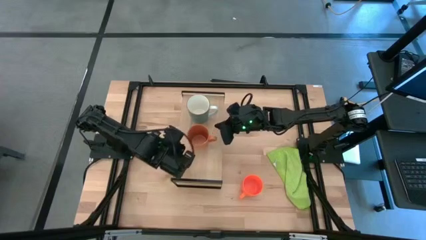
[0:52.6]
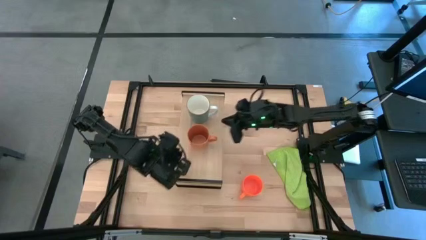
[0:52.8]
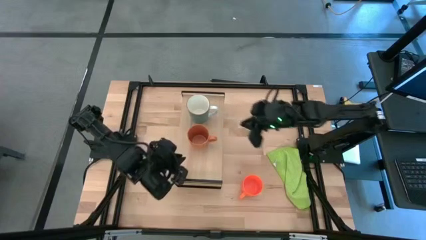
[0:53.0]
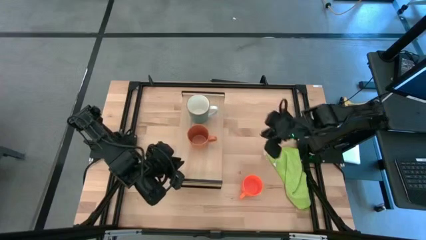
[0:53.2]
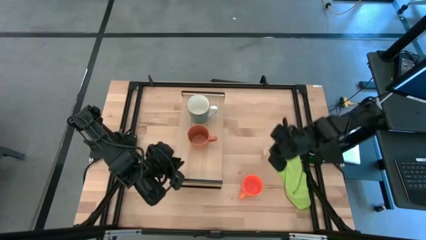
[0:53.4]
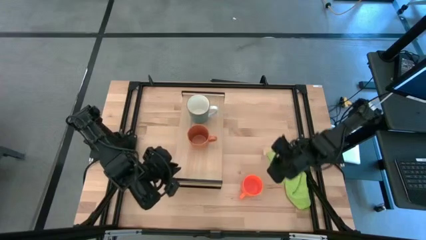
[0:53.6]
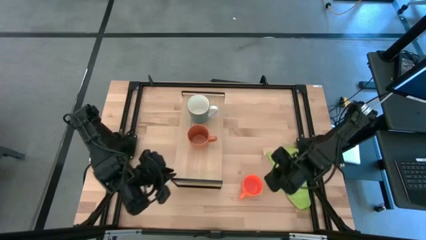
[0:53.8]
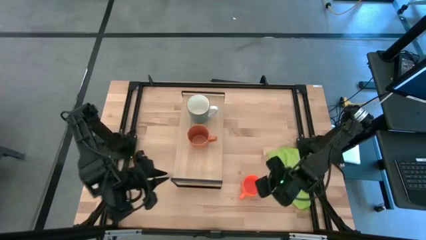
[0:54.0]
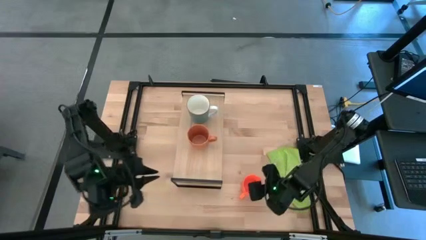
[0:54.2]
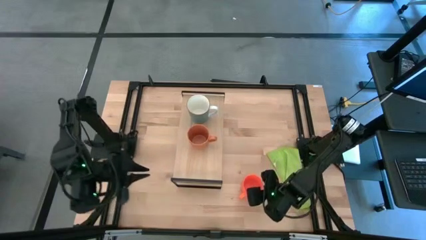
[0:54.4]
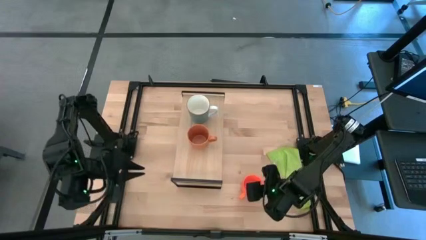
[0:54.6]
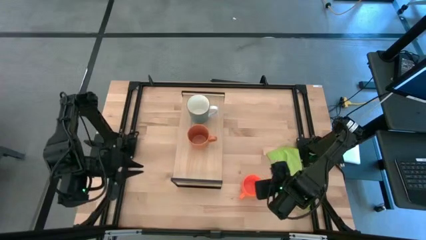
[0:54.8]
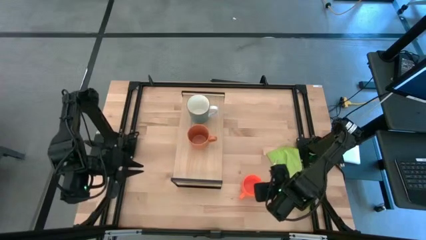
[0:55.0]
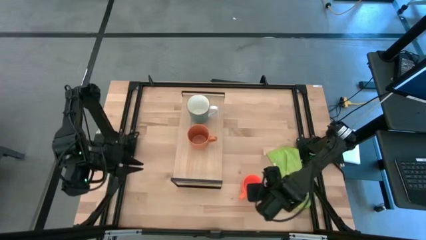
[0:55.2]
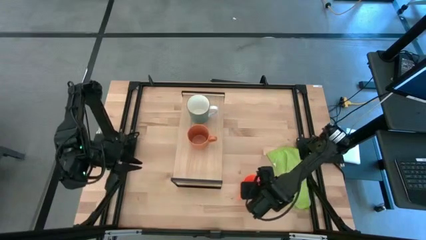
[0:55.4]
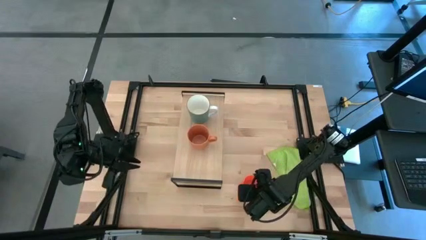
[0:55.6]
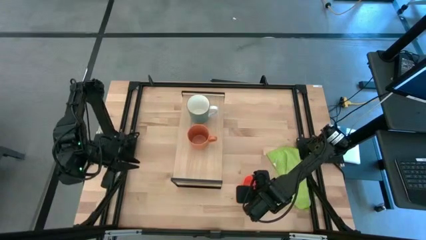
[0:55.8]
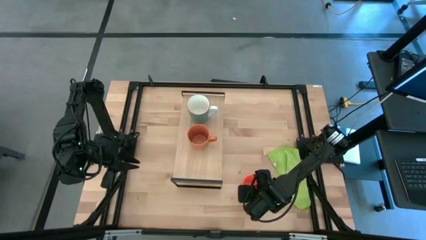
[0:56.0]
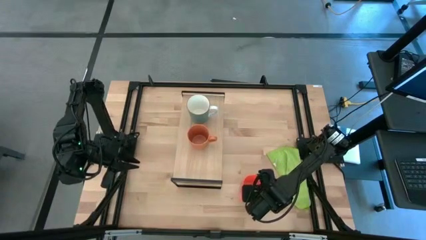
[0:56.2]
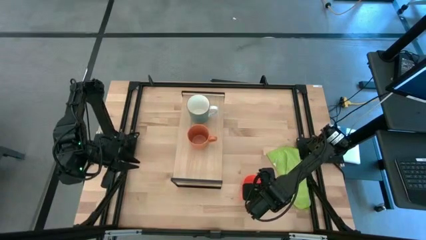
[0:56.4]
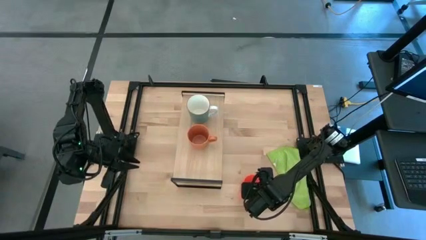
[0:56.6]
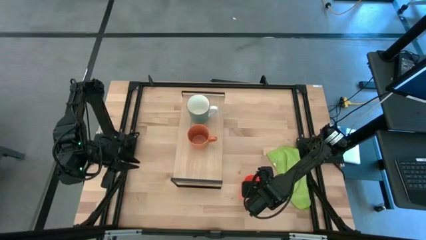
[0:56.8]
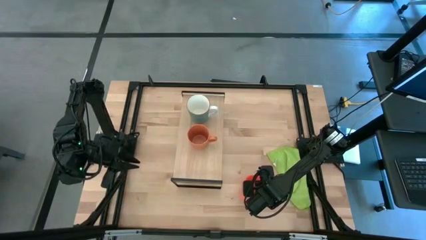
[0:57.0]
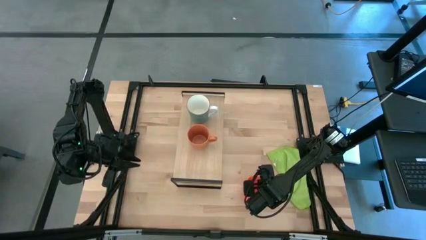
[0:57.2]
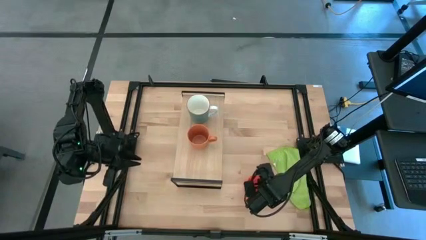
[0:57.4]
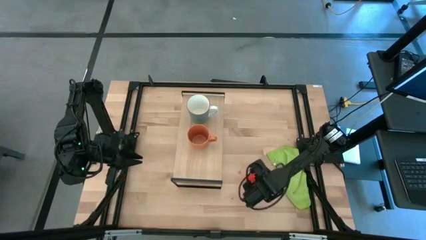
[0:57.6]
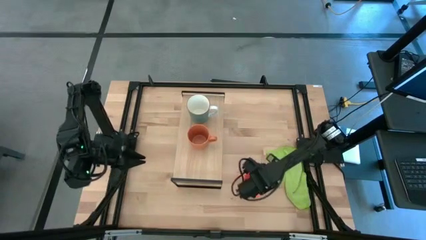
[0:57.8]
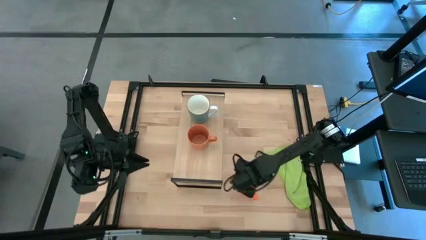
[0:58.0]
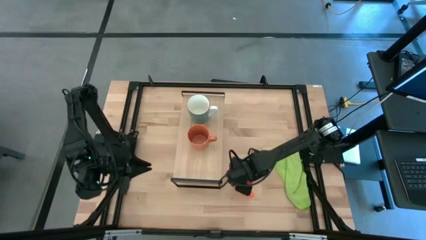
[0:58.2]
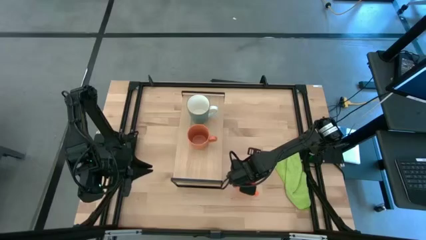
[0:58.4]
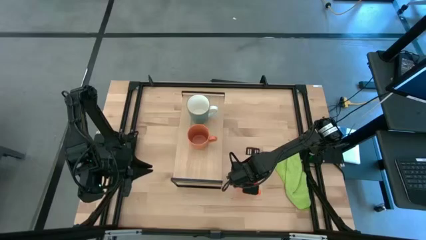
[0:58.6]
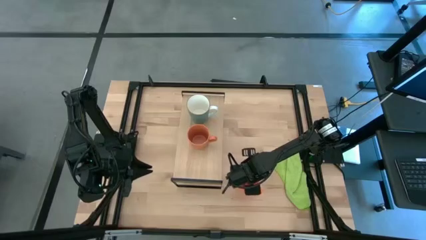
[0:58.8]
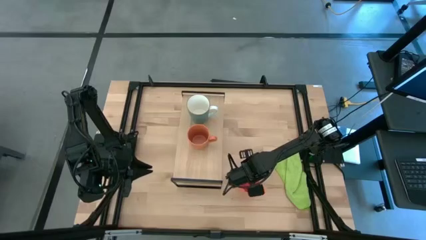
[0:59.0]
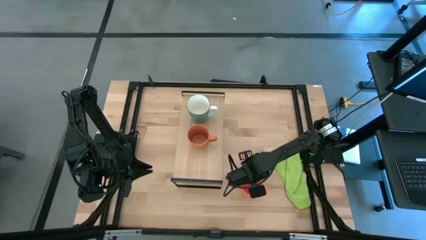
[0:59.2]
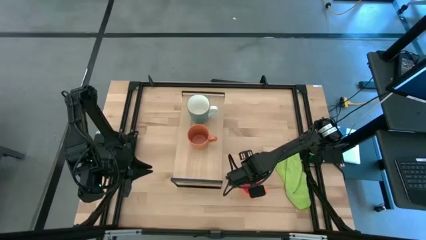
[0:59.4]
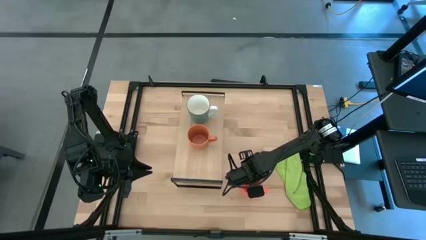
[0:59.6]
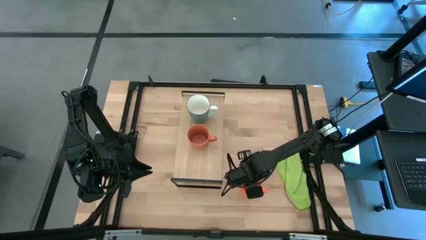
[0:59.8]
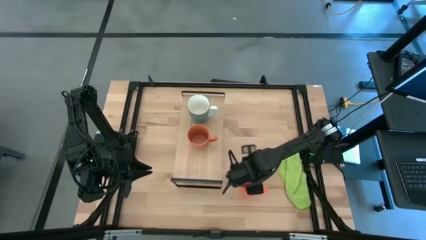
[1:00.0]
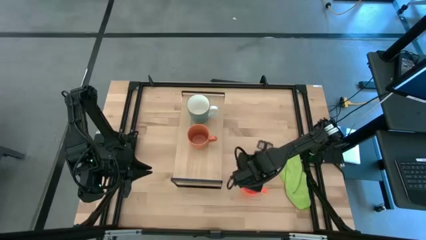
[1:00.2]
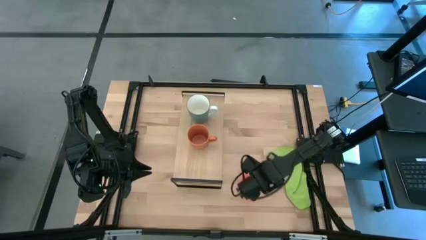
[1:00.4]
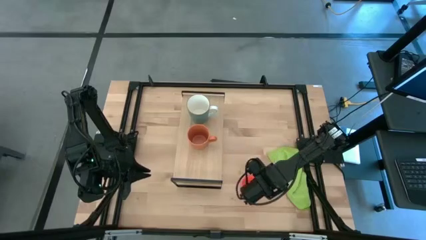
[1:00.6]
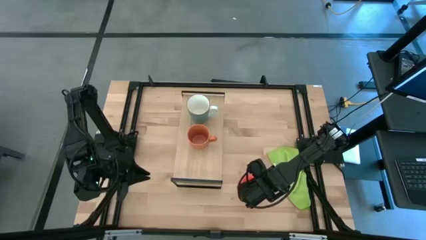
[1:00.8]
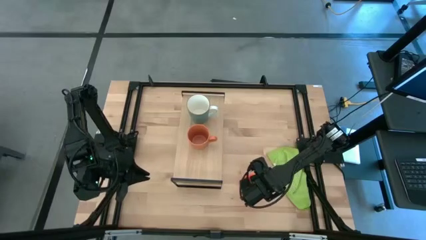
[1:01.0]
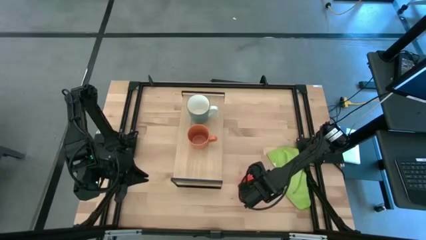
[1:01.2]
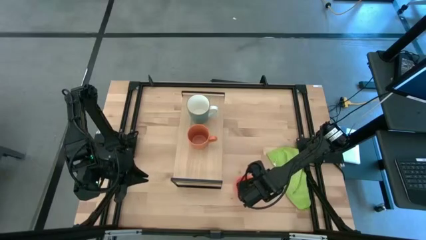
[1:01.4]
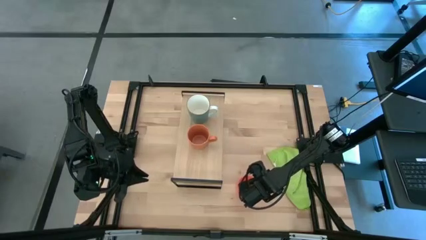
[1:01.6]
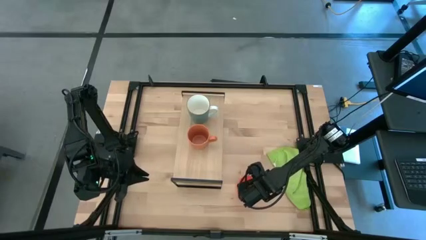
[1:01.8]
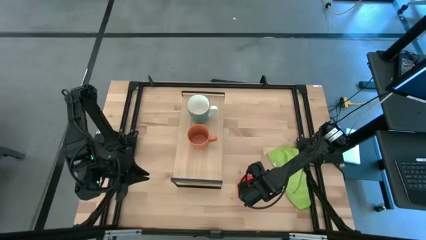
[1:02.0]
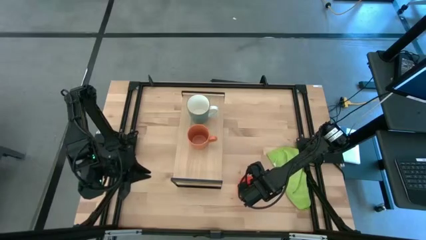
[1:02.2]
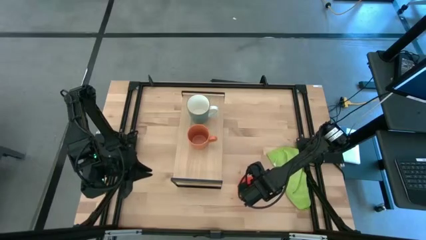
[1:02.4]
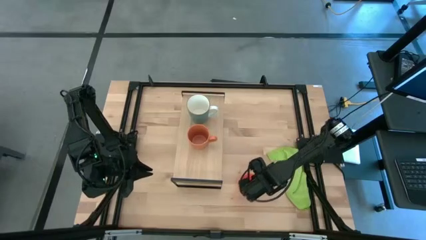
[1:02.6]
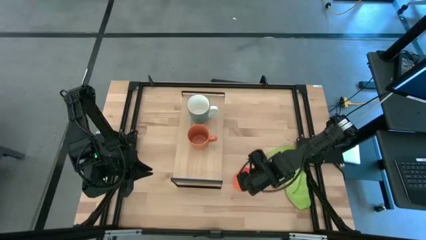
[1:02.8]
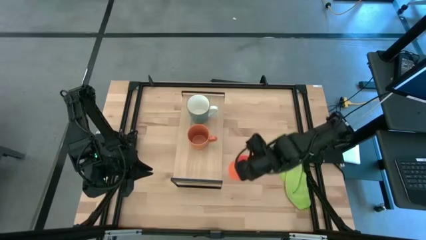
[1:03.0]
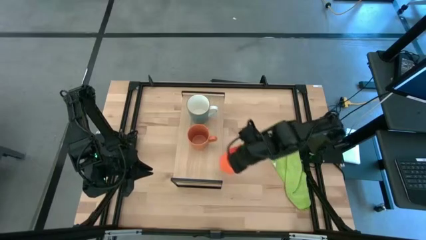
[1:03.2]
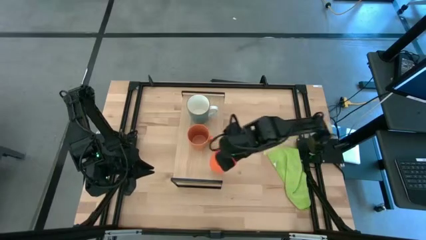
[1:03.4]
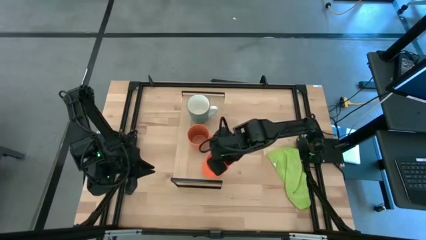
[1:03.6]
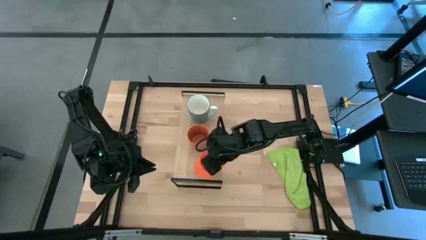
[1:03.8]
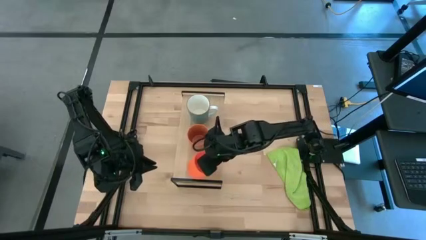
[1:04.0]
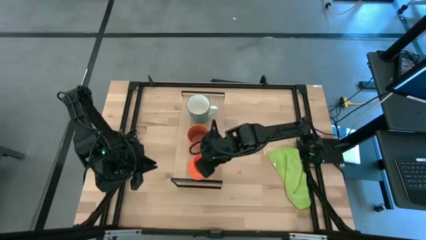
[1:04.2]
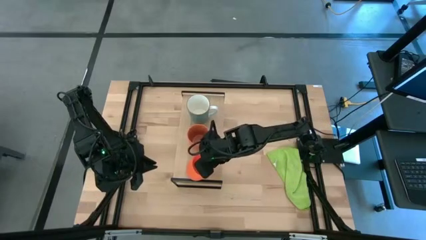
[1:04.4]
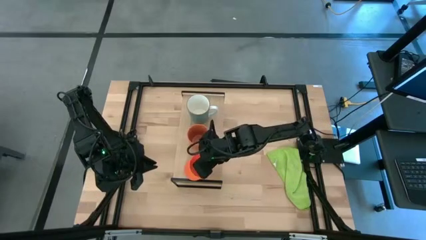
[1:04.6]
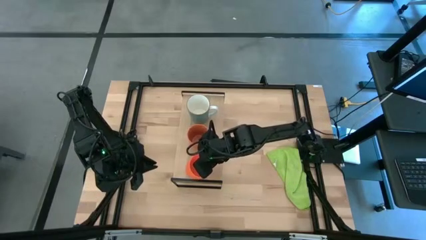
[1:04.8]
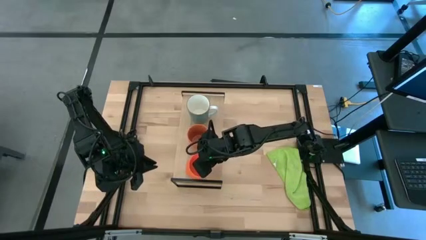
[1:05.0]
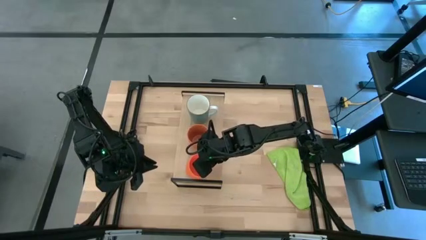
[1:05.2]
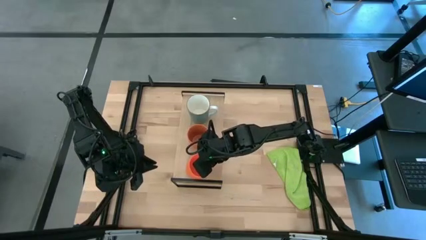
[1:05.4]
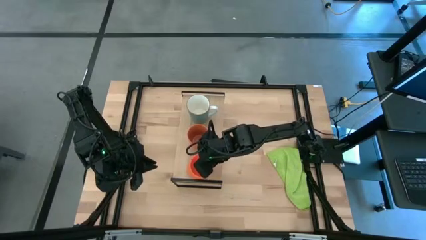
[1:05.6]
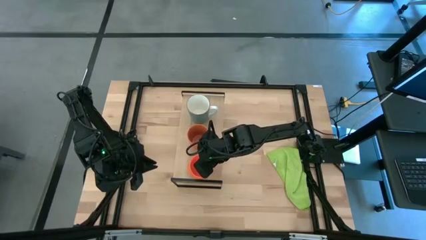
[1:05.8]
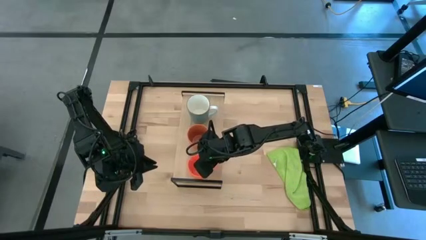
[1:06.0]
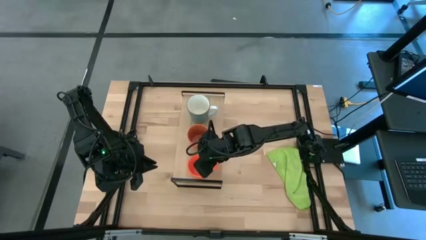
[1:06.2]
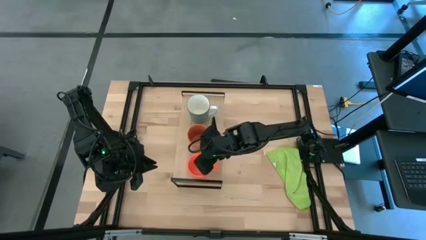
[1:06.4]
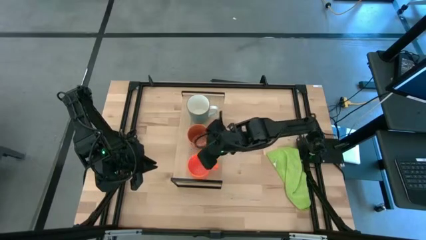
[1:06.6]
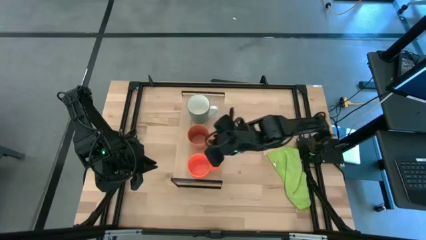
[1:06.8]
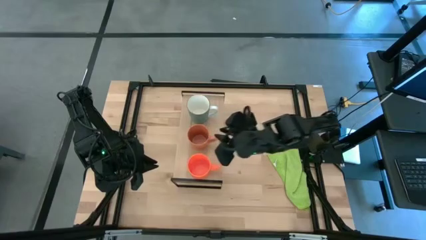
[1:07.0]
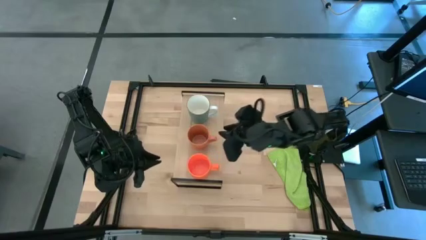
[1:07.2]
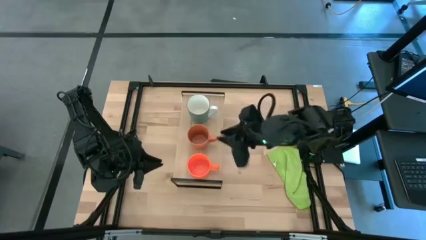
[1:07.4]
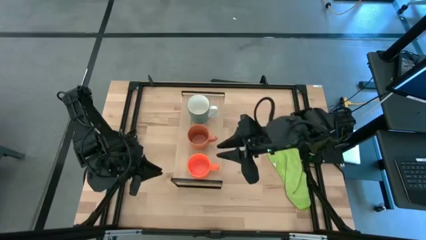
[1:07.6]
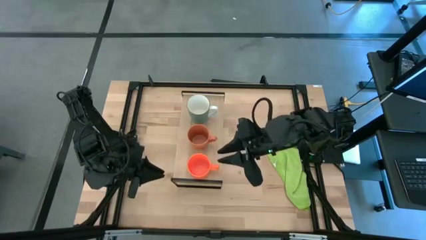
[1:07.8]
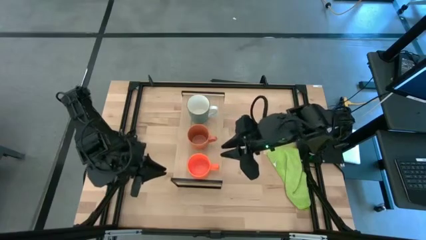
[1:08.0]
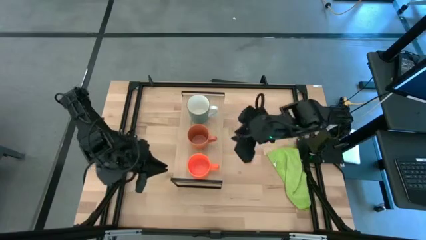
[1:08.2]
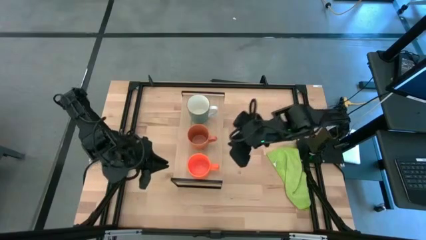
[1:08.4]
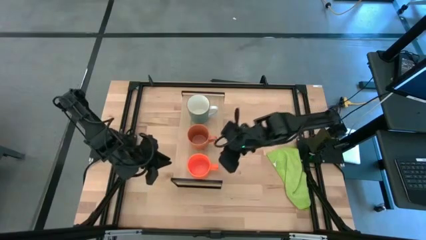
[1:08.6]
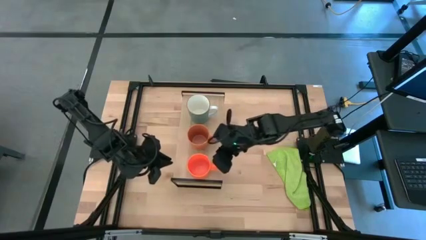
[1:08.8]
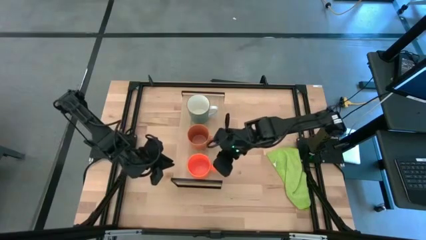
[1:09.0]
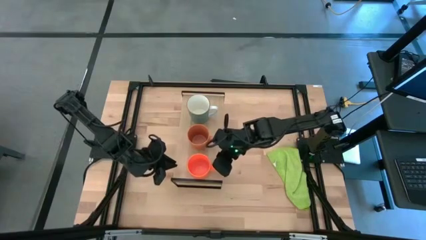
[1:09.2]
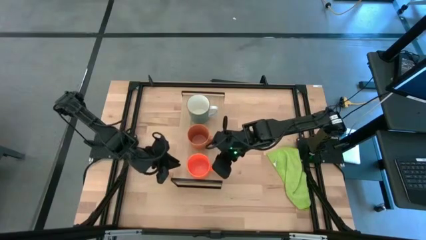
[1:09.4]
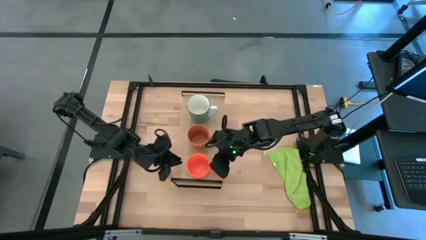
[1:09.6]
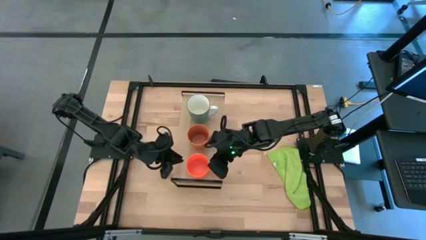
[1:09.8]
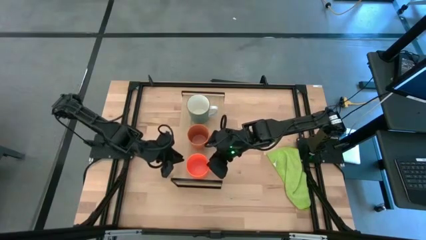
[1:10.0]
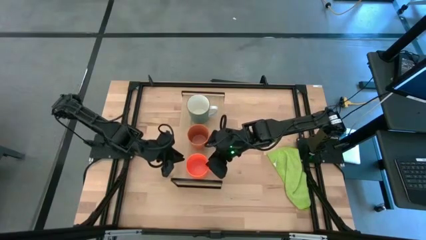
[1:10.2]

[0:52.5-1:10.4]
Task: Stack small to large cups/mugs on shelf
Put the orange mug on the shelf
